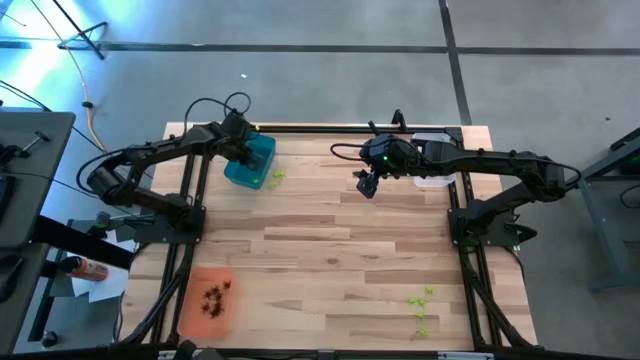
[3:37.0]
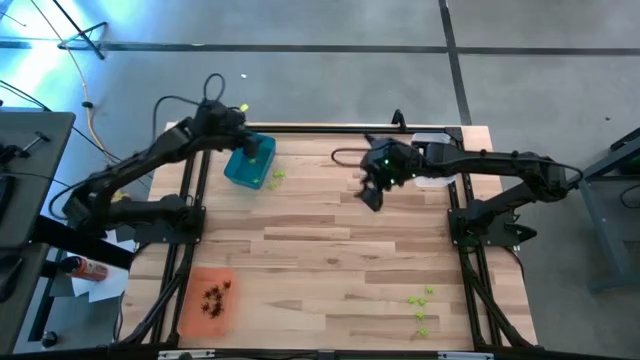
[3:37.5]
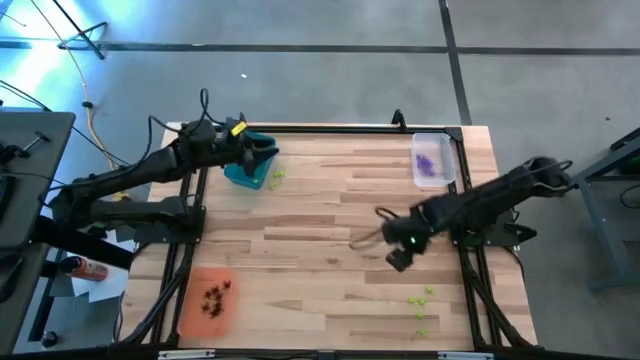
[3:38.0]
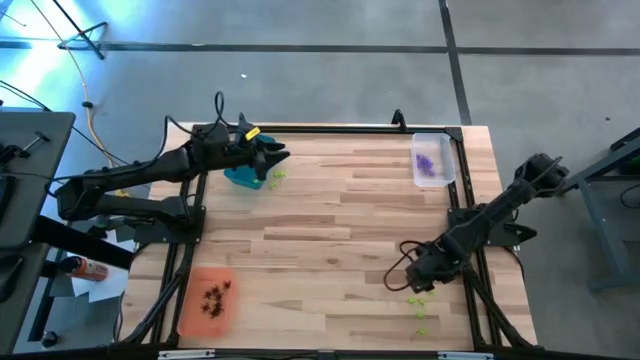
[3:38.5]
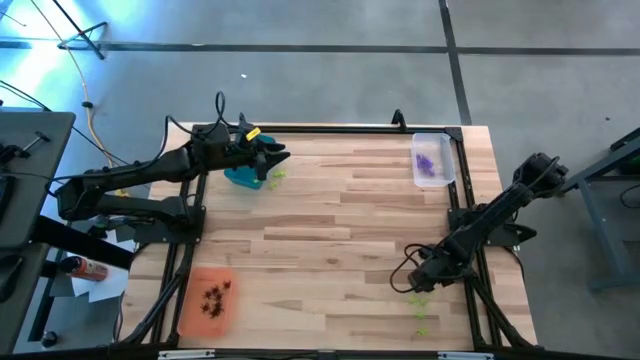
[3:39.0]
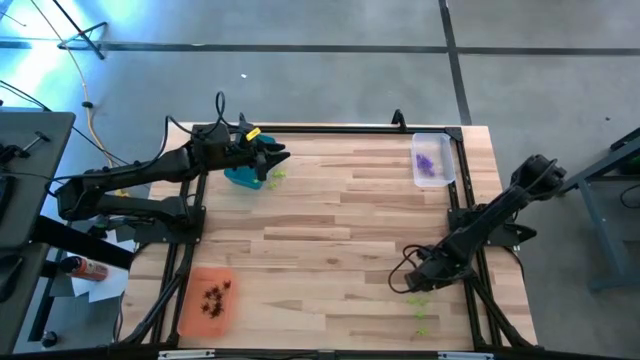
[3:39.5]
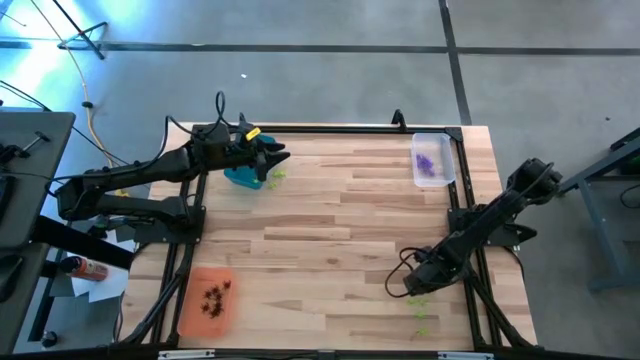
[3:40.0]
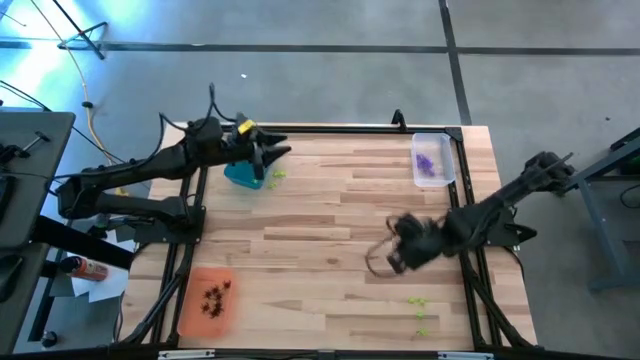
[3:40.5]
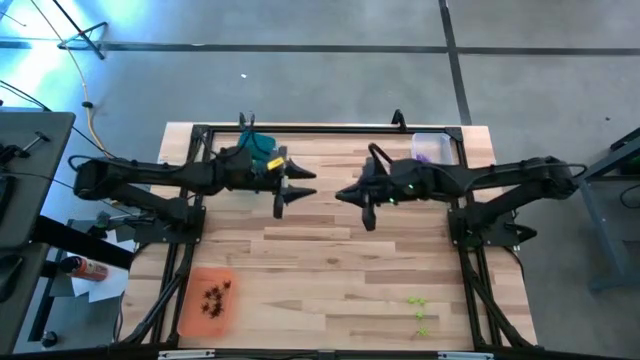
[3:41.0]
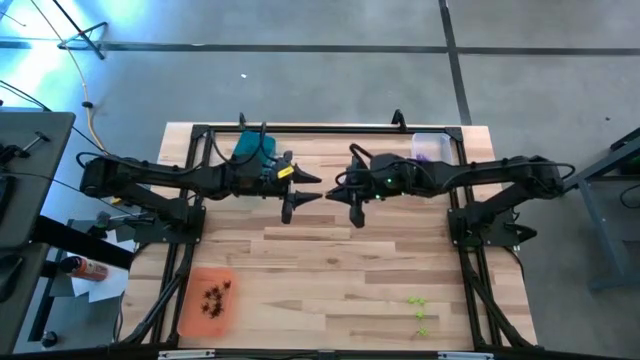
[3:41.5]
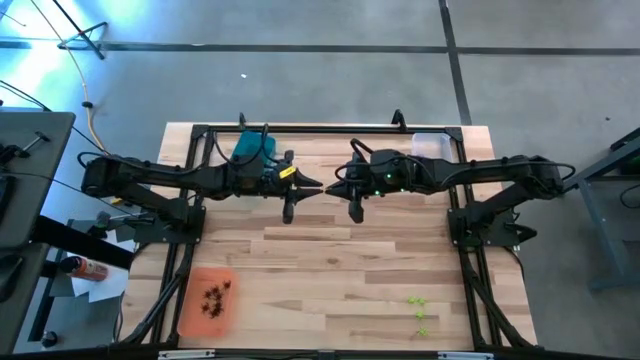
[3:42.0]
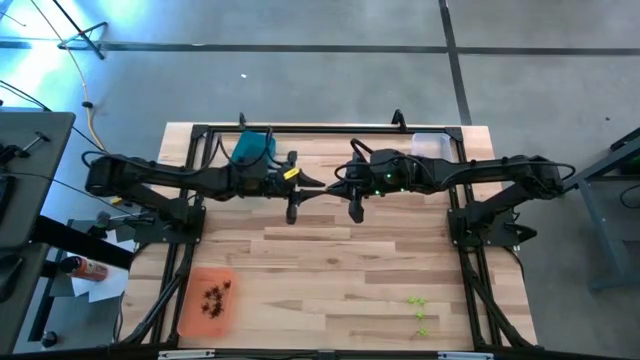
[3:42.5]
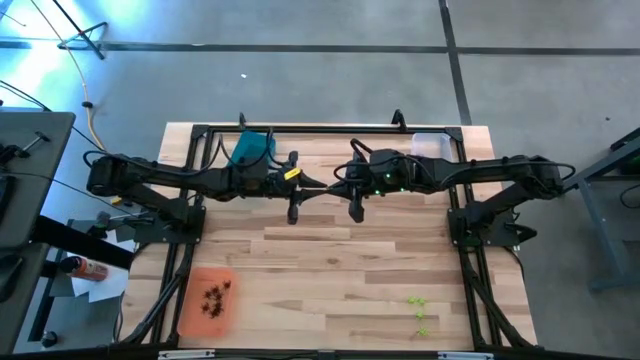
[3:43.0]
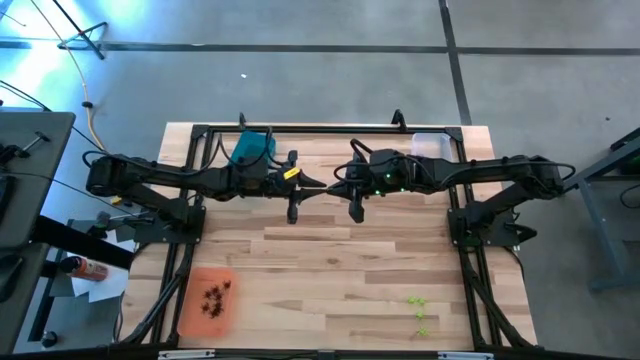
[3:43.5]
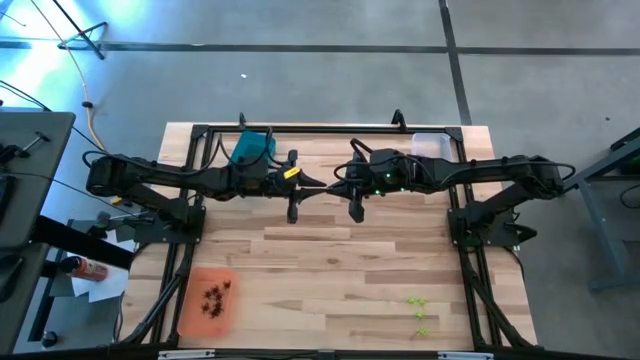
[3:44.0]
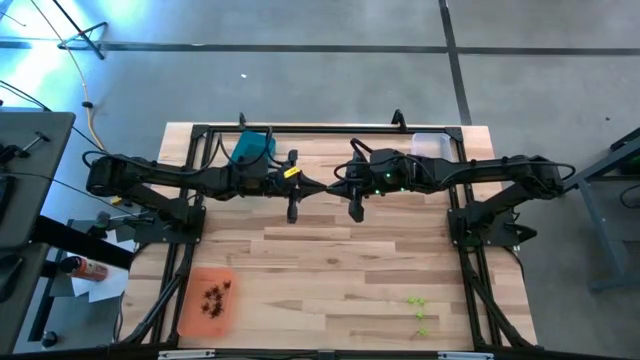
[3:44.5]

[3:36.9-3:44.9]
Task: Sort Halloween decoration
Put the green spider toy into the blue bin

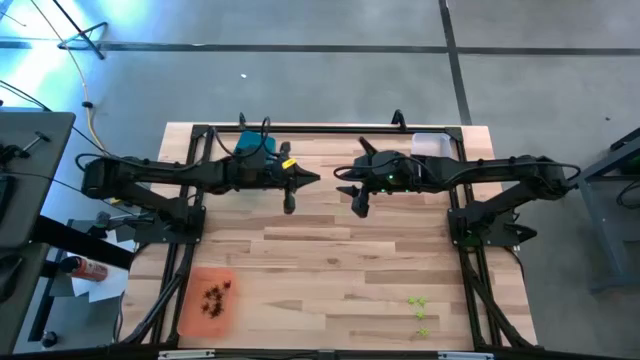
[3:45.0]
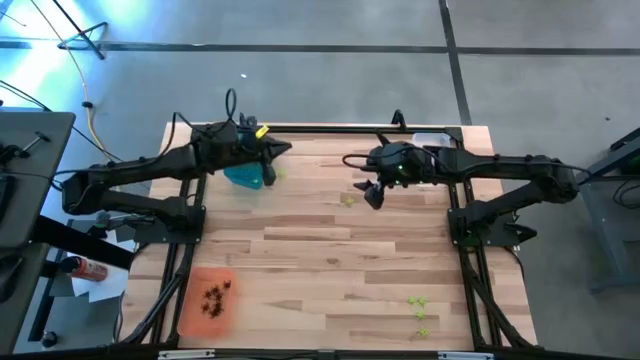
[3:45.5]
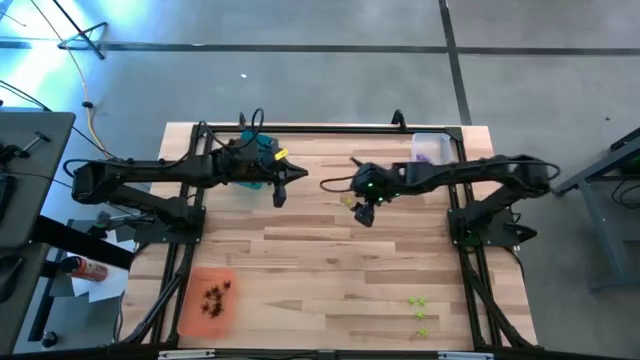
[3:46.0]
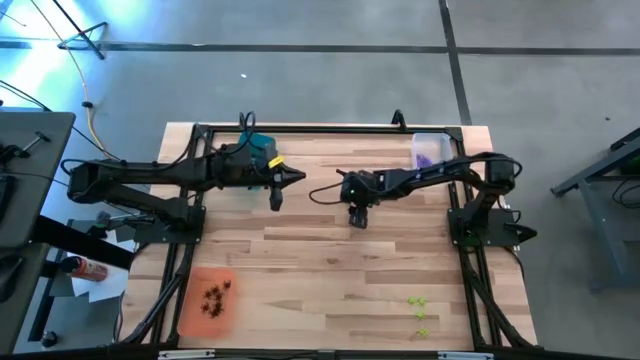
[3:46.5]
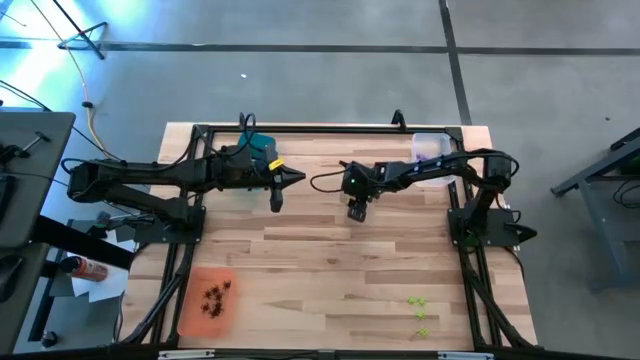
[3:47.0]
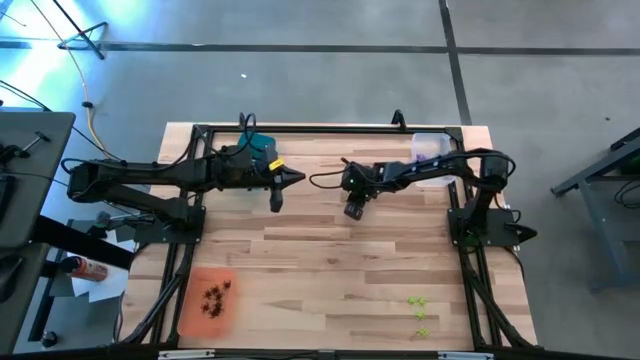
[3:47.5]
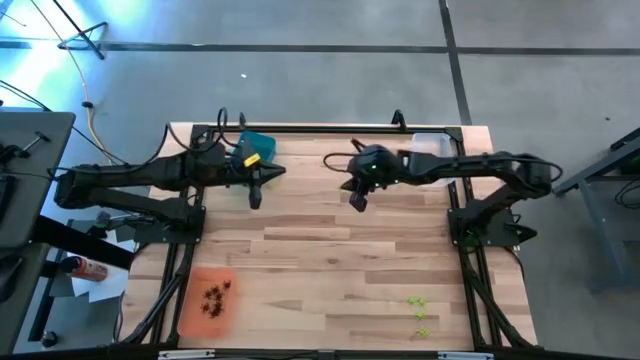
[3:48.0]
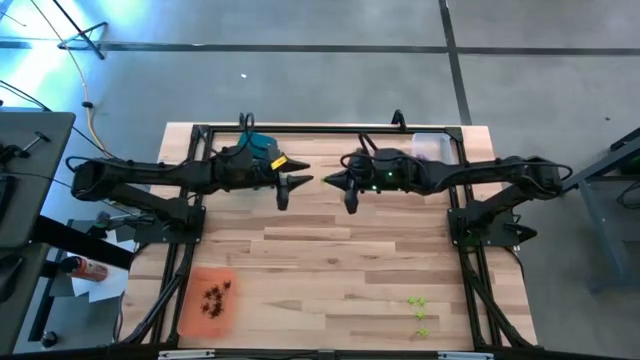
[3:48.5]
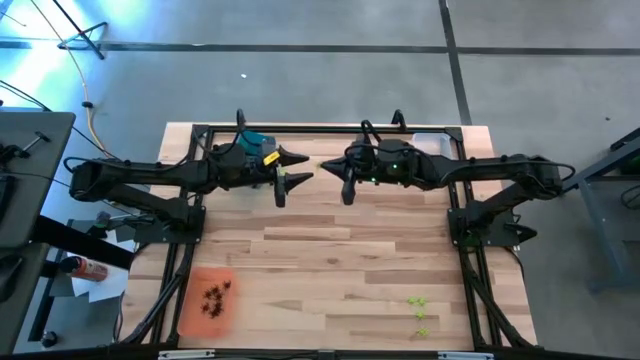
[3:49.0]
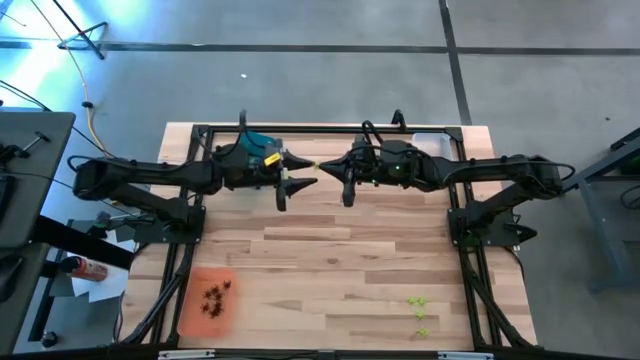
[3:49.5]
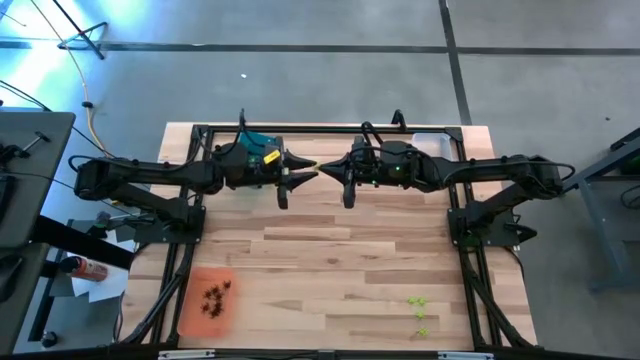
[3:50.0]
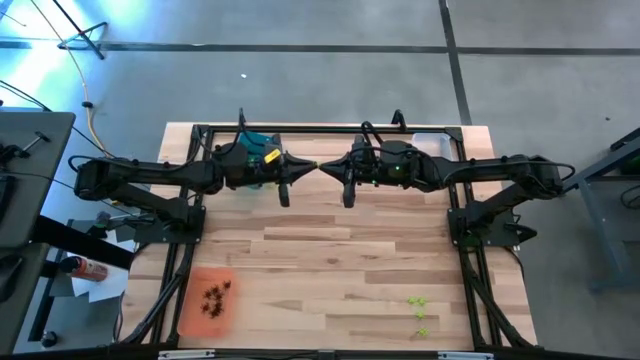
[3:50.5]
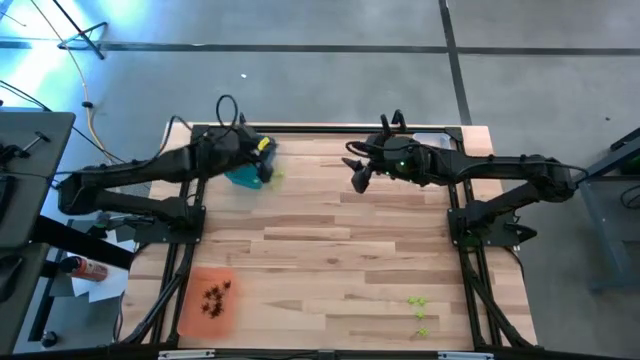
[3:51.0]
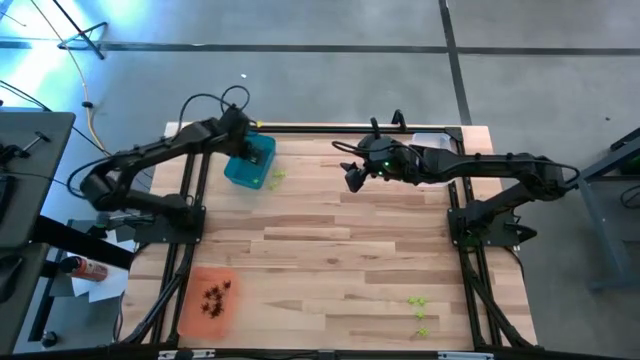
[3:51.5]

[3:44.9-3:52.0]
Put the green spider toy into the blue bin

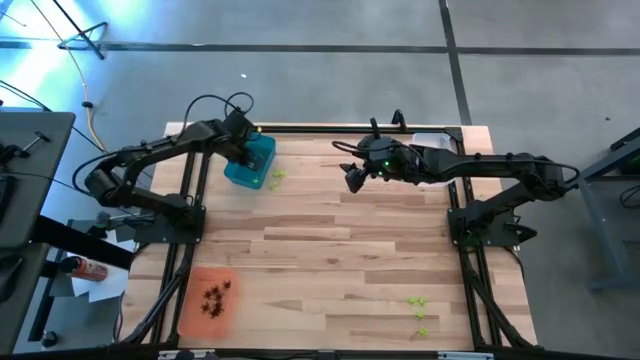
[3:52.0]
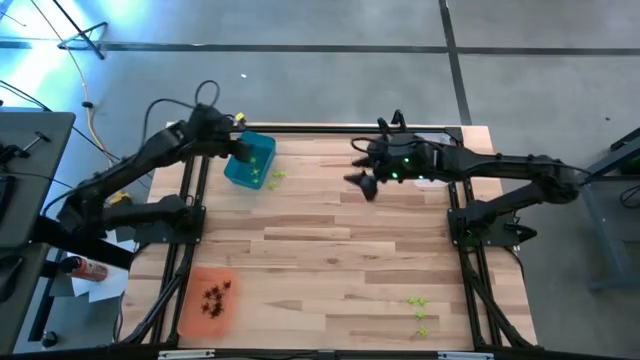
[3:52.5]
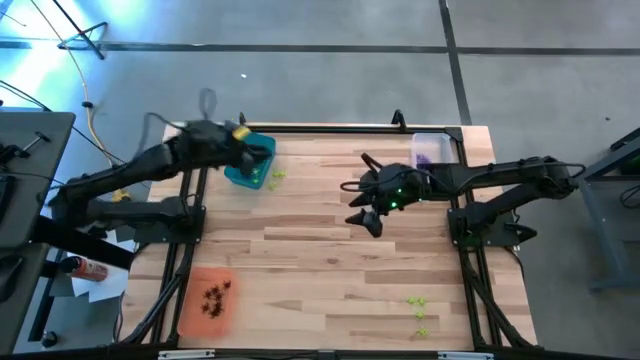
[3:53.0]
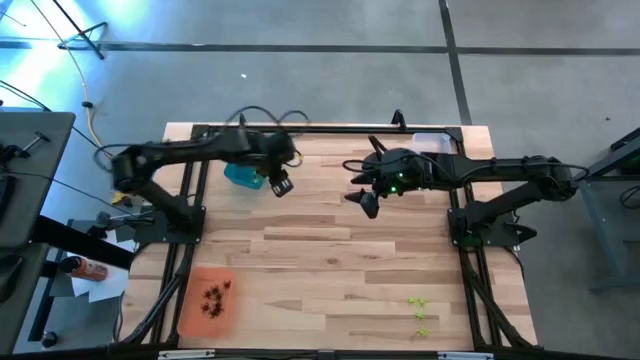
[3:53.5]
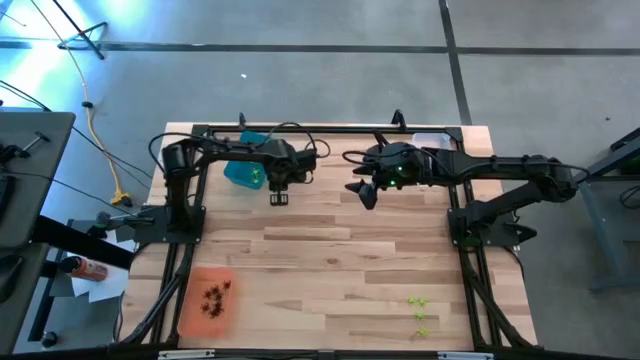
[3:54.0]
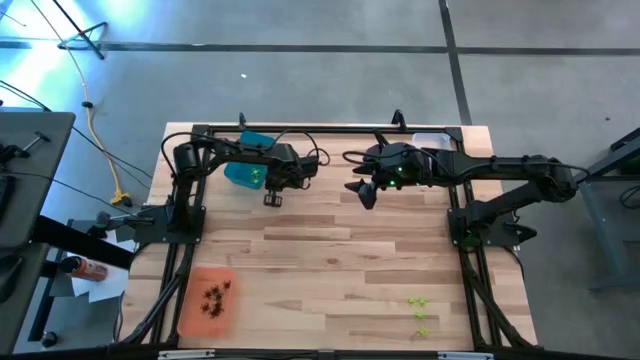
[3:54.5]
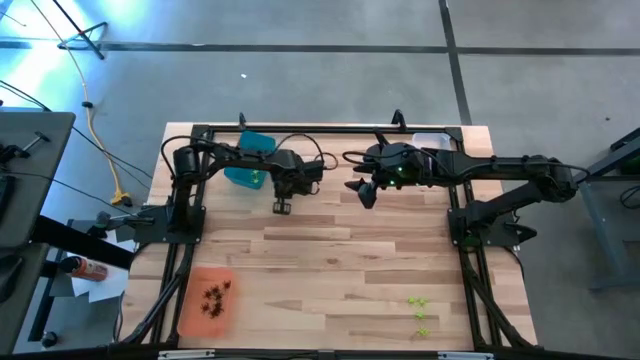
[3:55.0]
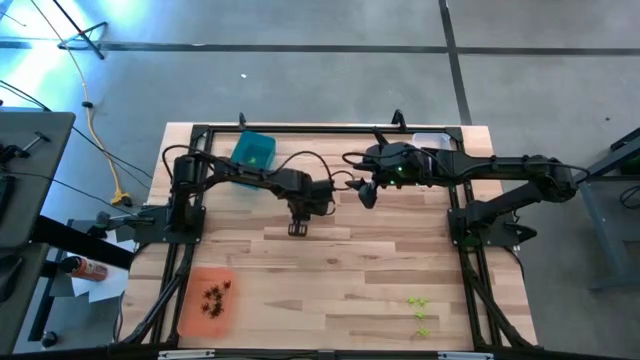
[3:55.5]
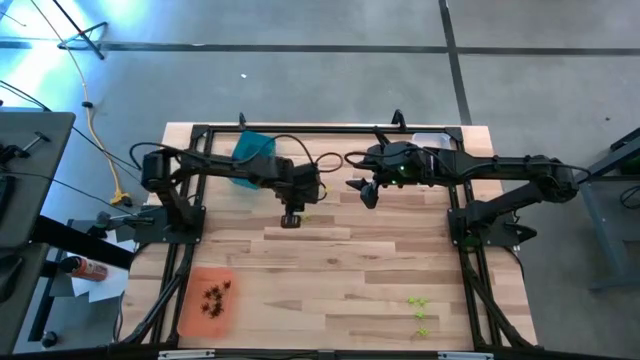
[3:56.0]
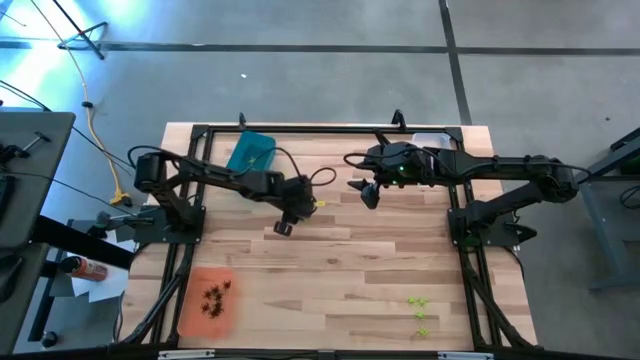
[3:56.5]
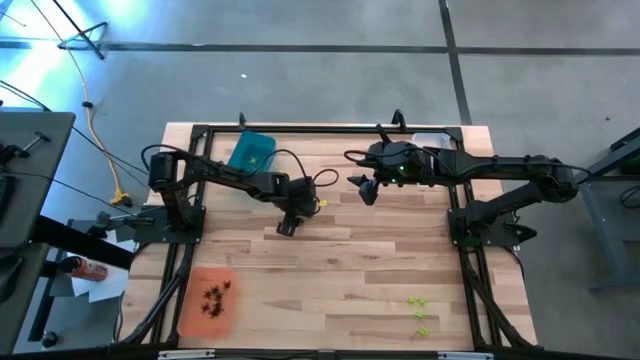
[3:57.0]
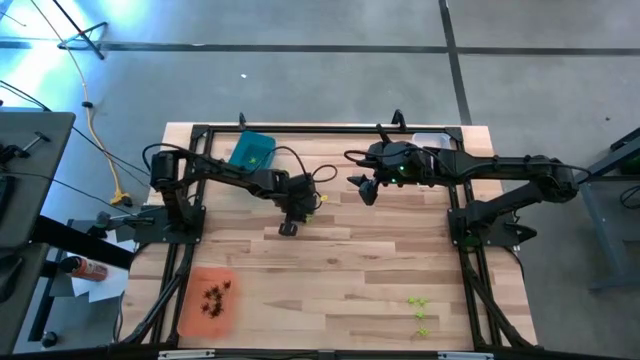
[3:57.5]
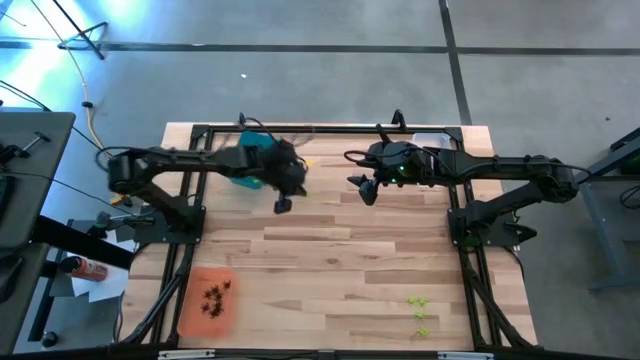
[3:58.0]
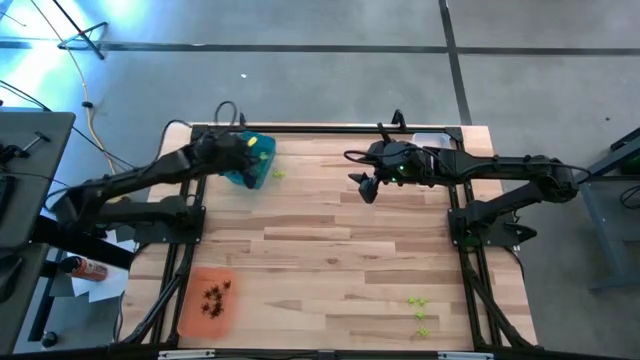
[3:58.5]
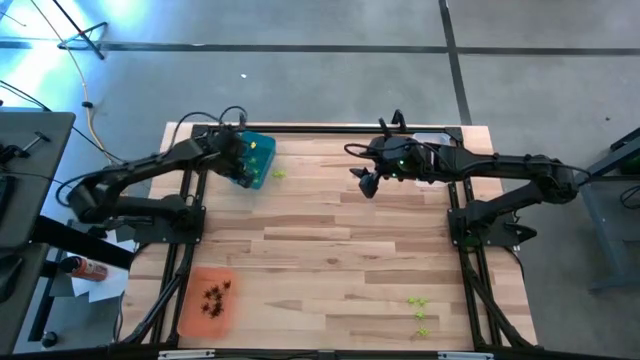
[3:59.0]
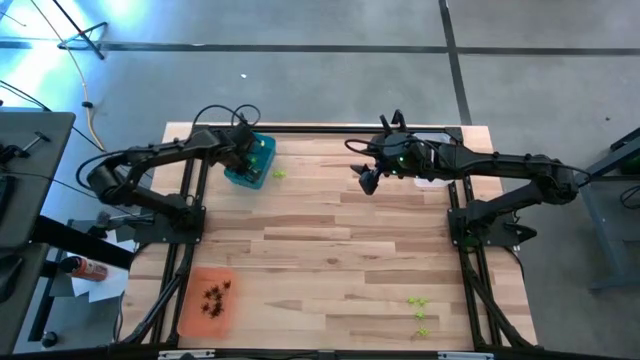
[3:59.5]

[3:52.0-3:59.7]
Put the green spider toy into the blue bin
